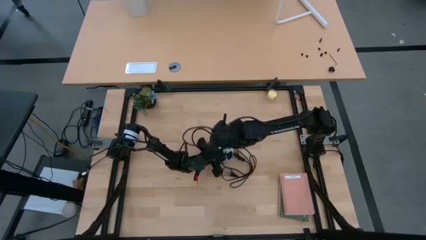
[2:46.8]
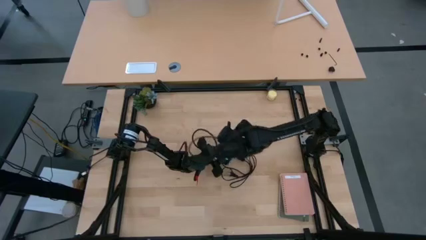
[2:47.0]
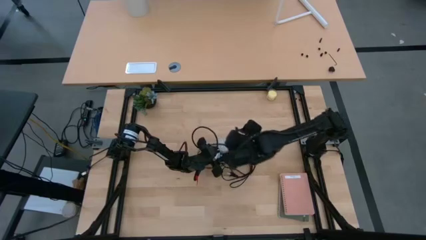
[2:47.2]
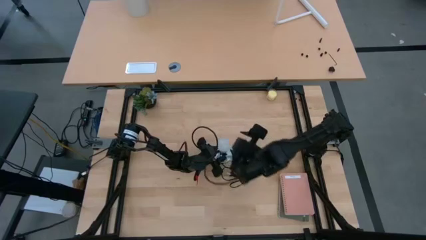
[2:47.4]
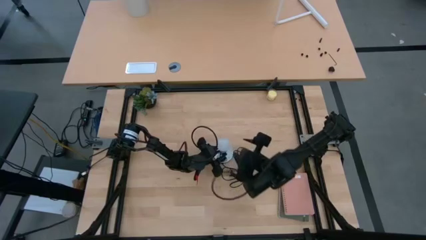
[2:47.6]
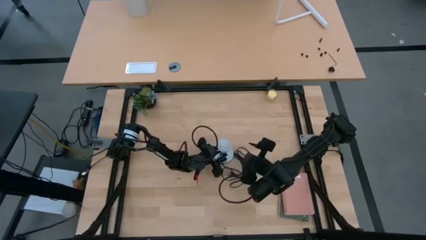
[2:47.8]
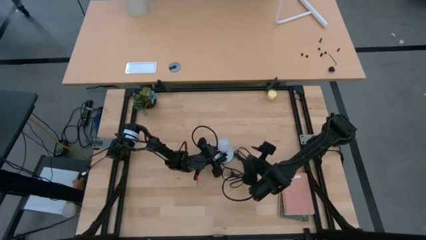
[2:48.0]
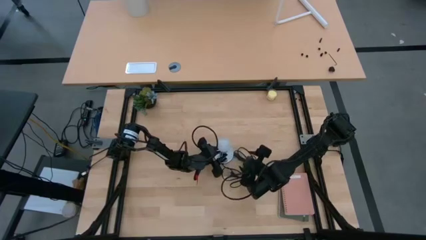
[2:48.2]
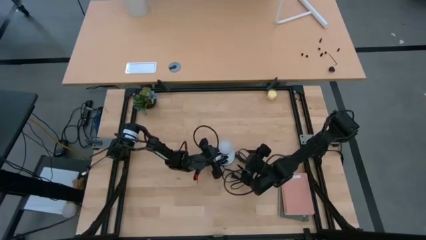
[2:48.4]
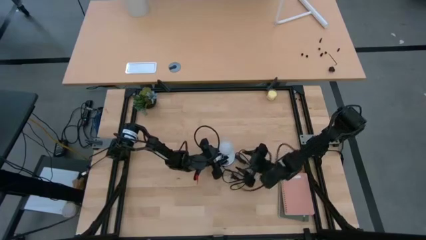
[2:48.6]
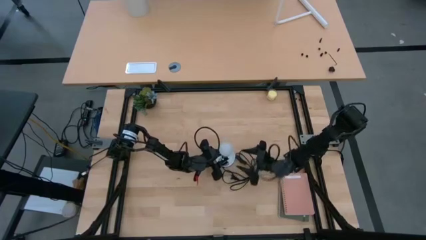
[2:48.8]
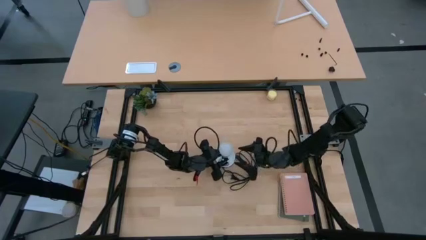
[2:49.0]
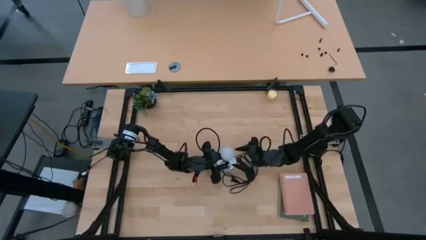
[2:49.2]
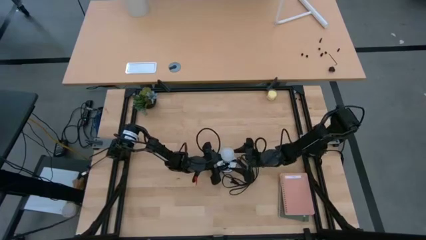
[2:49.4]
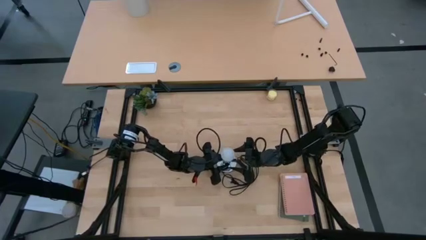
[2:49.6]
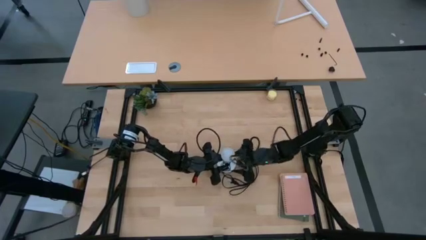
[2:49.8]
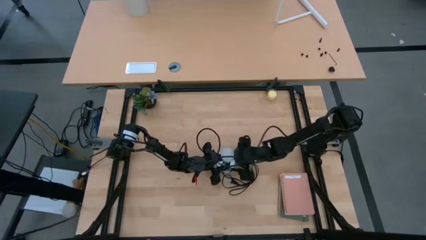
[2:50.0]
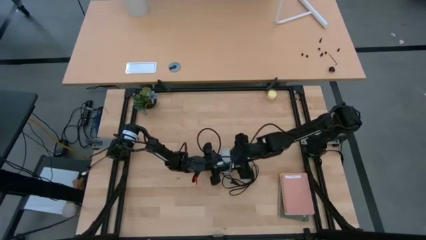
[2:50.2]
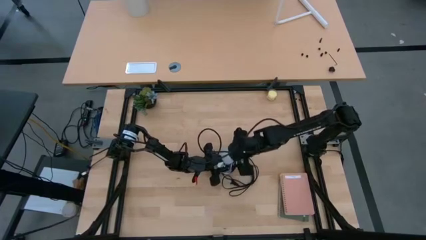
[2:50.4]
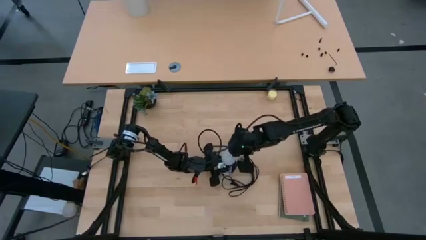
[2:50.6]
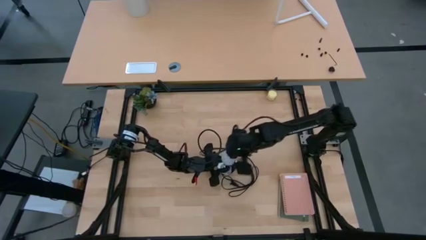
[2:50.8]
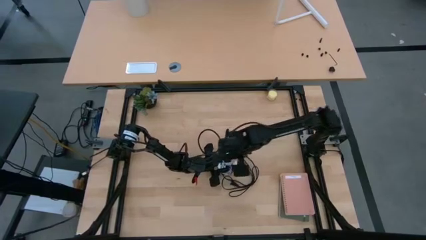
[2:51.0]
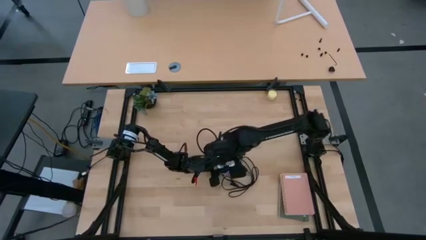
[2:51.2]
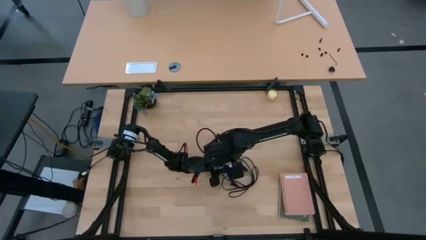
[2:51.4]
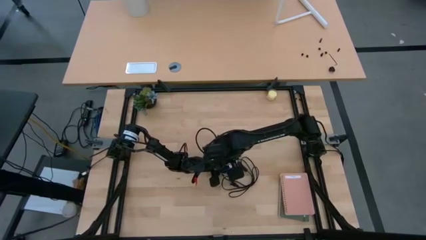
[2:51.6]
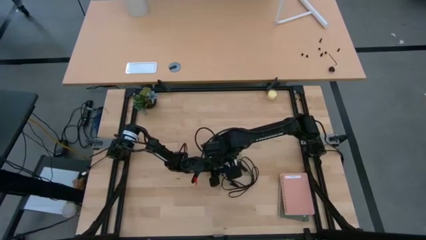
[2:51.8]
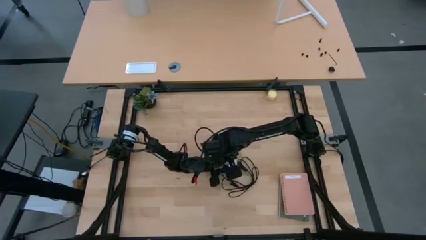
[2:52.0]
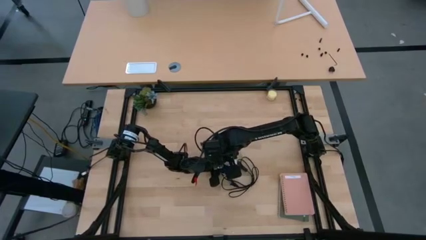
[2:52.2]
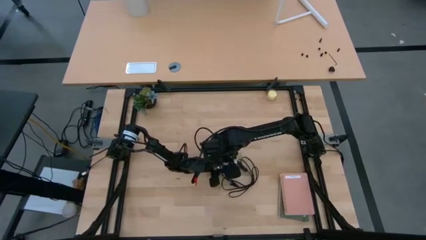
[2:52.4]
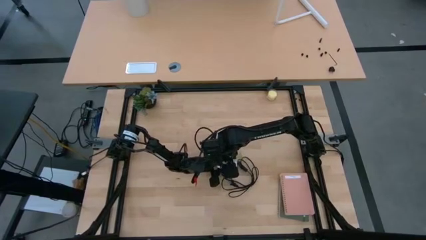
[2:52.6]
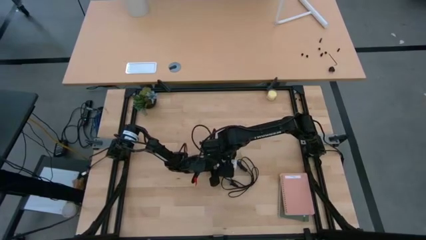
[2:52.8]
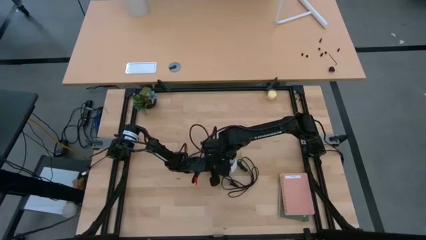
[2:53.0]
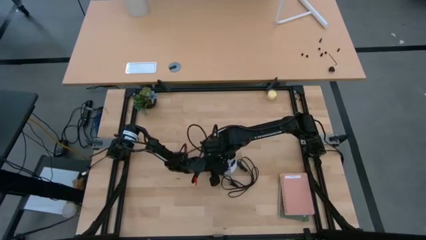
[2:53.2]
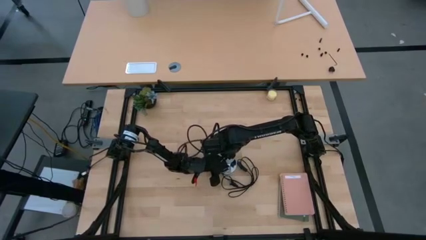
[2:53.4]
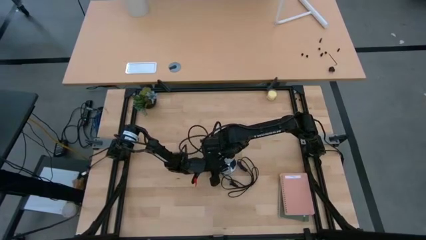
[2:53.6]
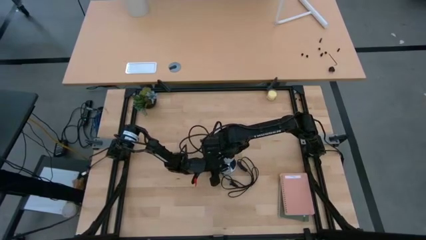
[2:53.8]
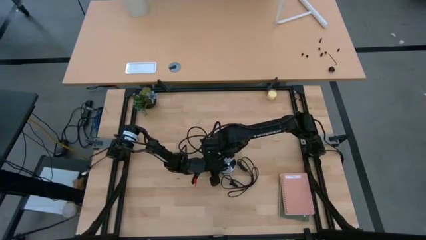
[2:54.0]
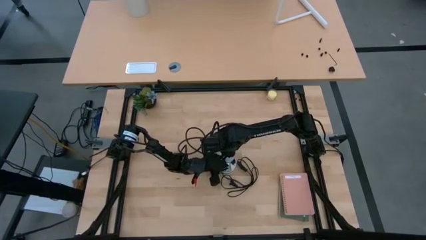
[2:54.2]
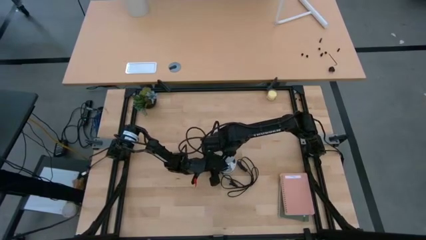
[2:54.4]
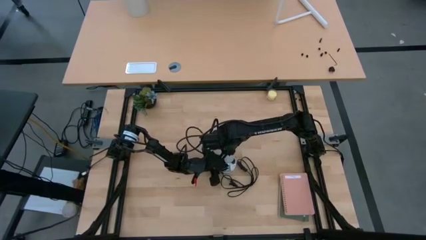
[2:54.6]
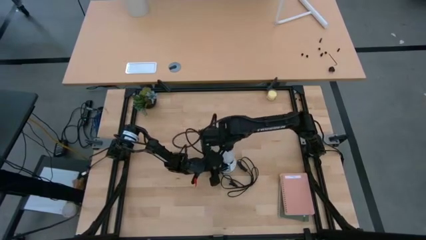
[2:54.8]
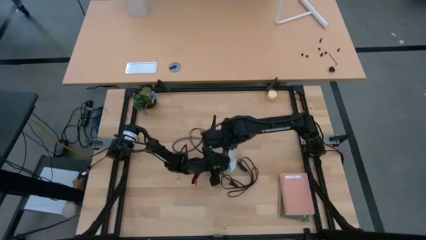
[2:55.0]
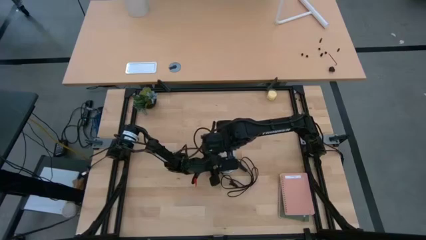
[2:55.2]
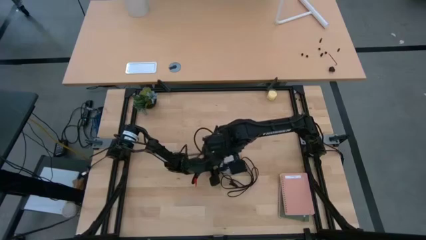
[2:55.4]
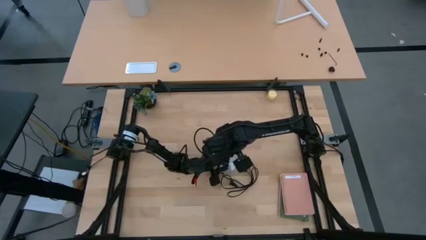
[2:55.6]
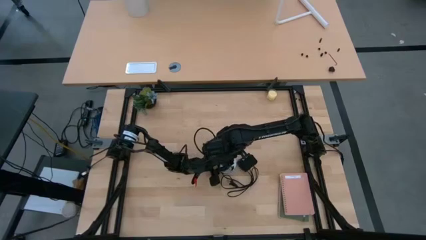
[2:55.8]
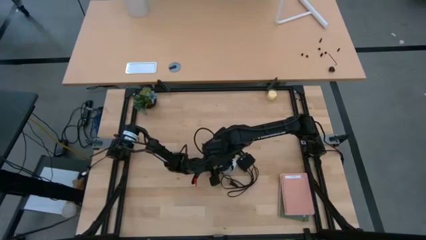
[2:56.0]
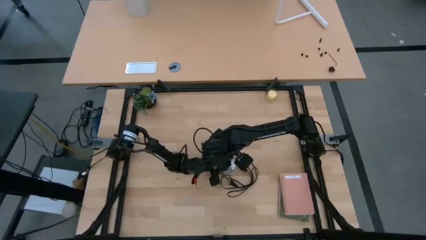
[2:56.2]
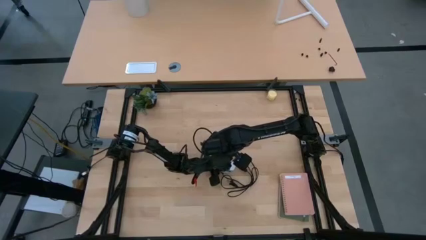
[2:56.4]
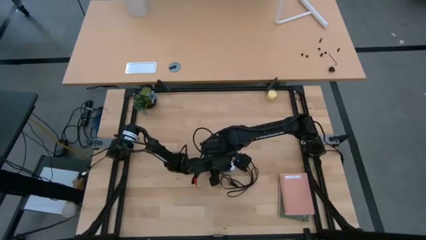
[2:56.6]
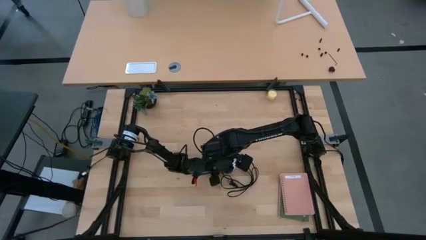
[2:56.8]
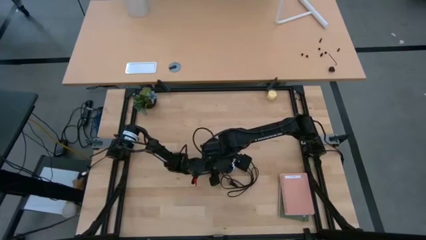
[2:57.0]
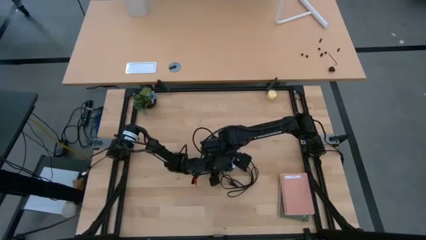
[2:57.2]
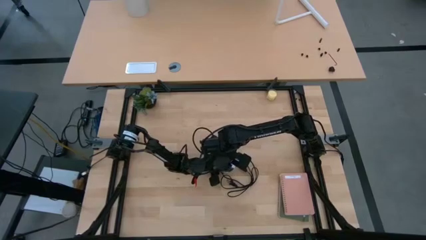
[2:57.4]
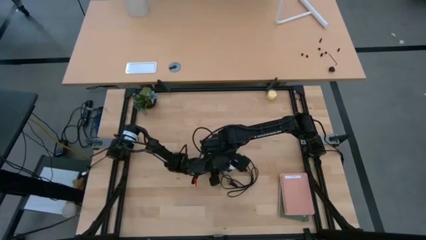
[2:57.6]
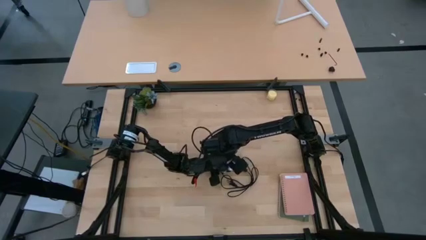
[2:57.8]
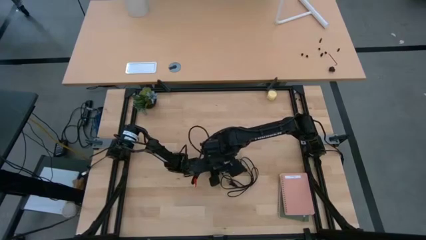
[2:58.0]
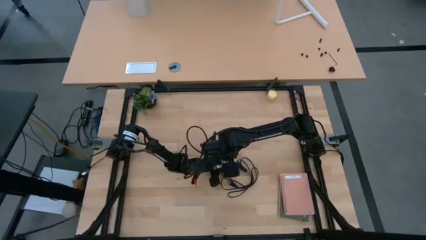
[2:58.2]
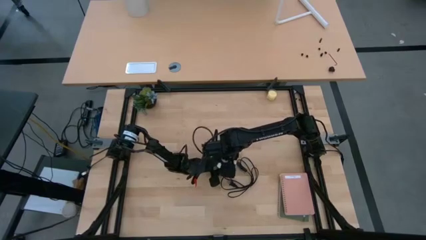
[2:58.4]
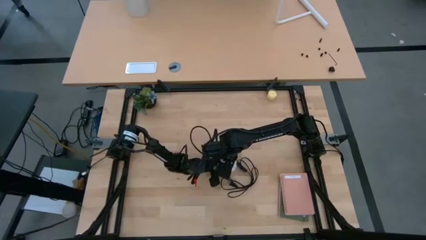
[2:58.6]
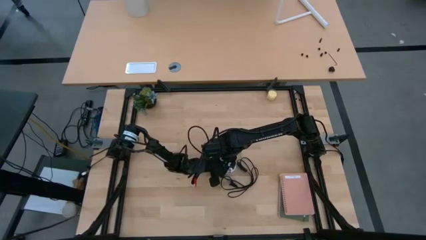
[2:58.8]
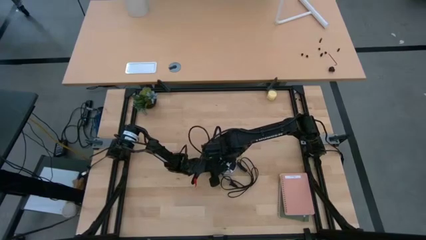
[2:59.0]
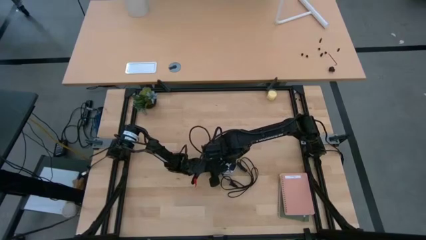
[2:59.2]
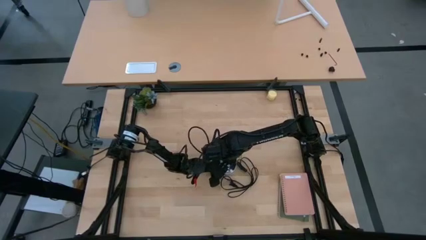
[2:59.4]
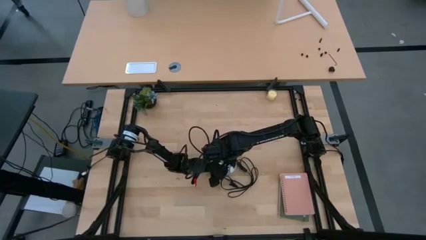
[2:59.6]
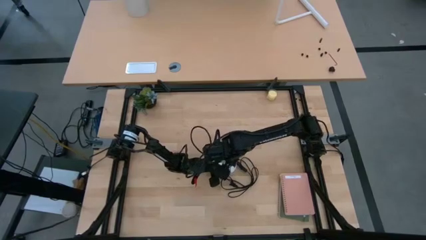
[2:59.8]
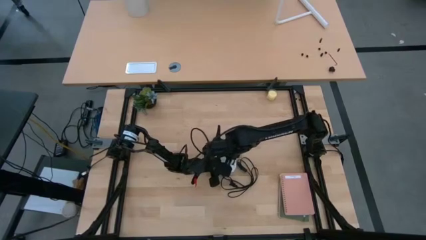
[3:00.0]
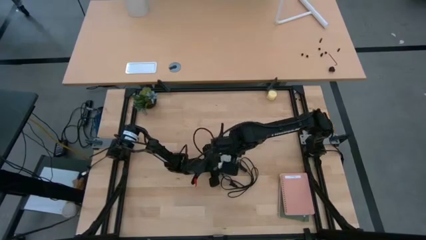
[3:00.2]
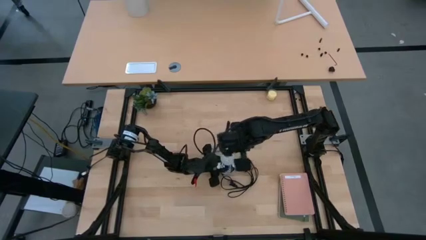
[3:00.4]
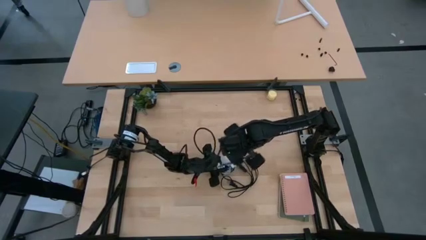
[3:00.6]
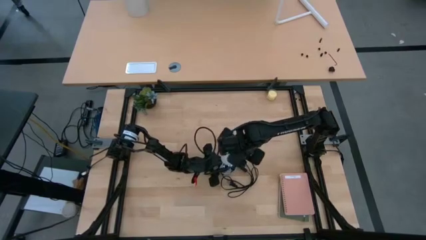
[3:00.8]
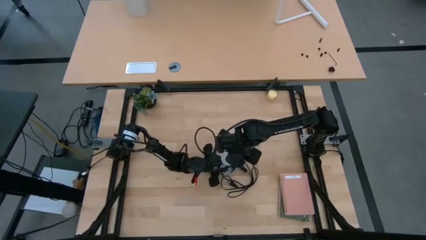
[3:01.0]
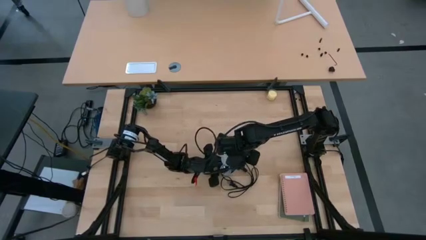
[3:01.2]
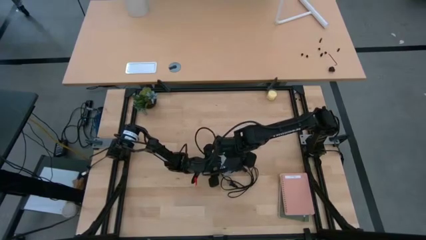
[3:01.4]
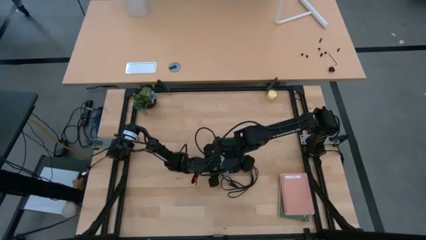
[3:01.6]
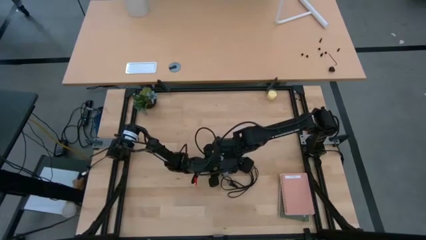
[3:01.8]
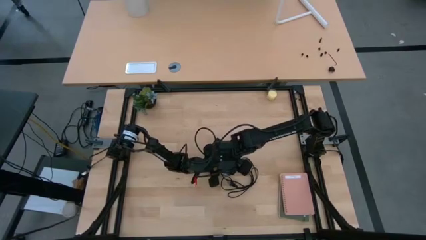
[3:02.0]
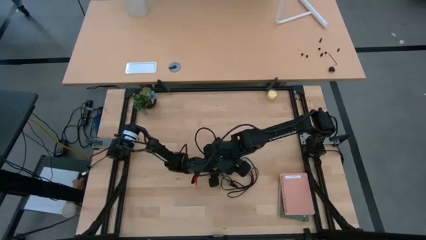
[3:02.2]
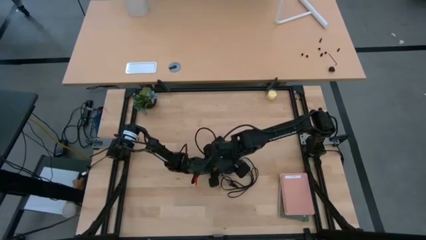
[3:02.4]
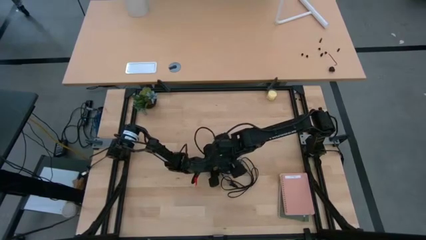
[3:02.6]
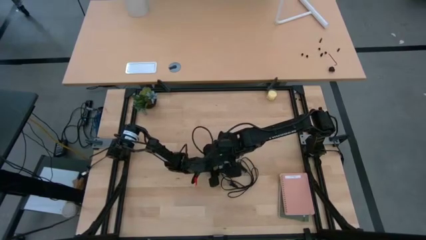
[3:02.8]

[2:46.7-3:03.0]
Task: Screw lightbulb
Insert the lightbulb into the lamp
